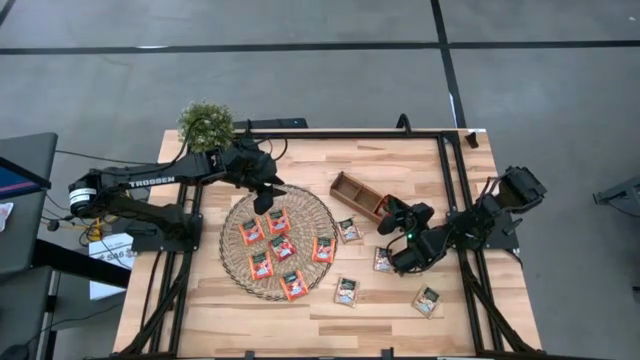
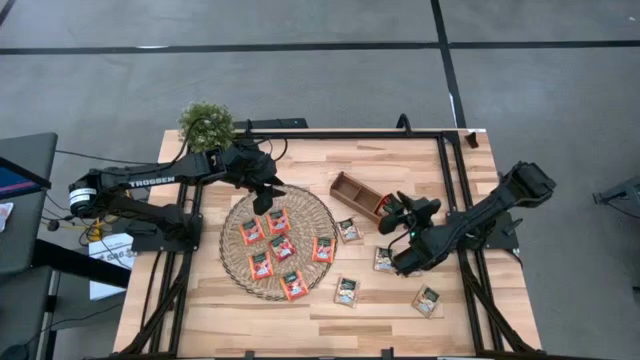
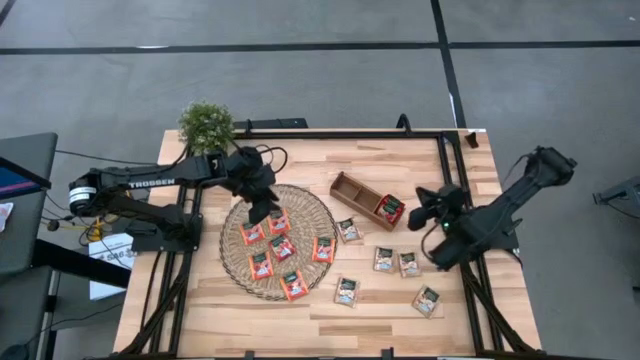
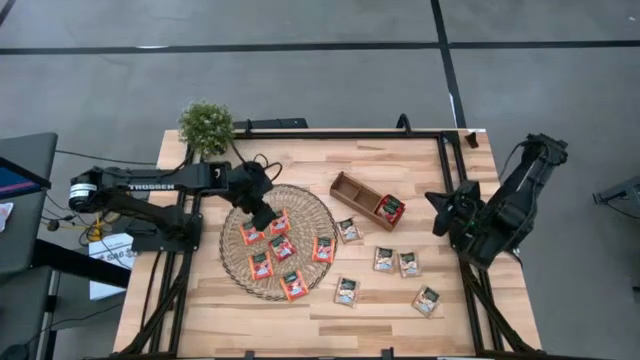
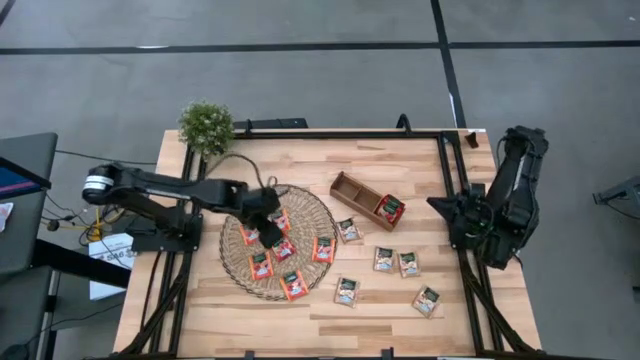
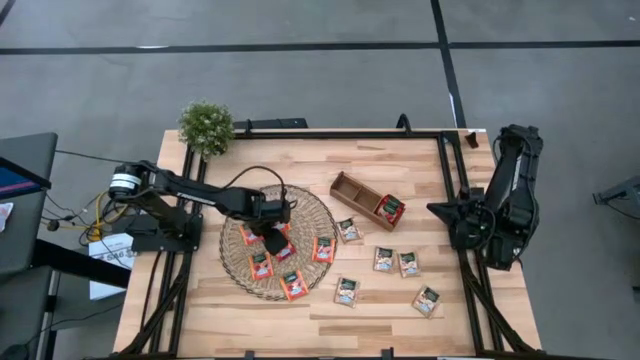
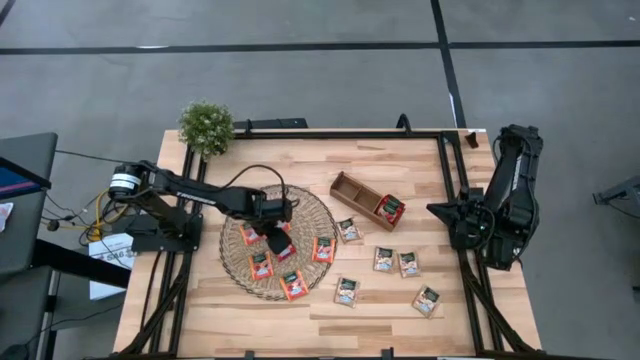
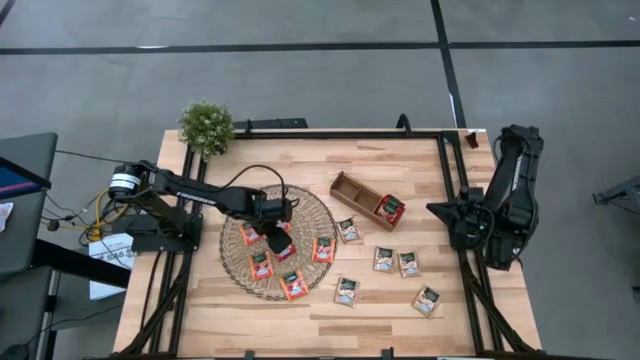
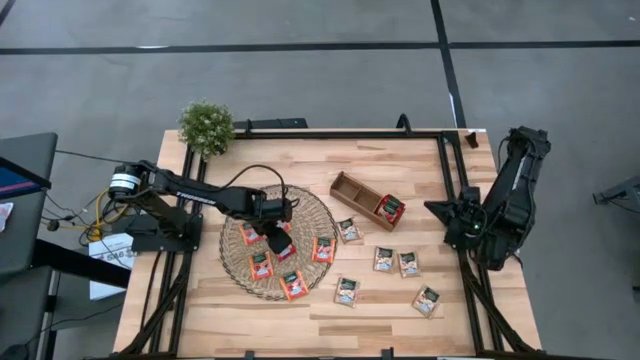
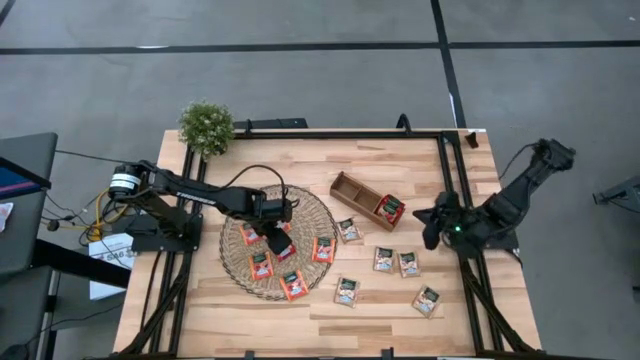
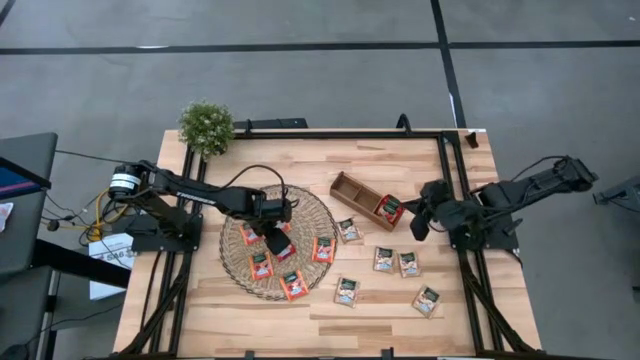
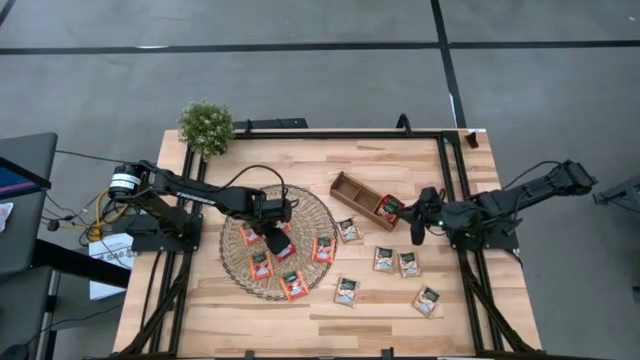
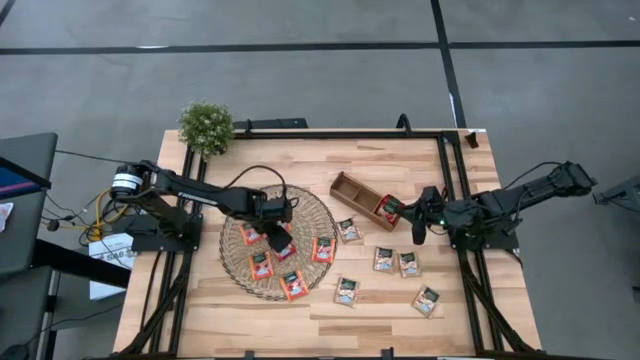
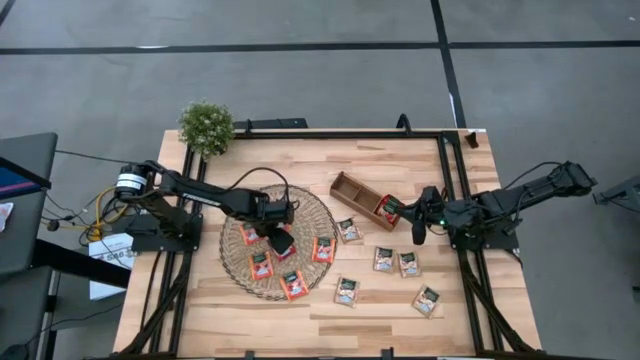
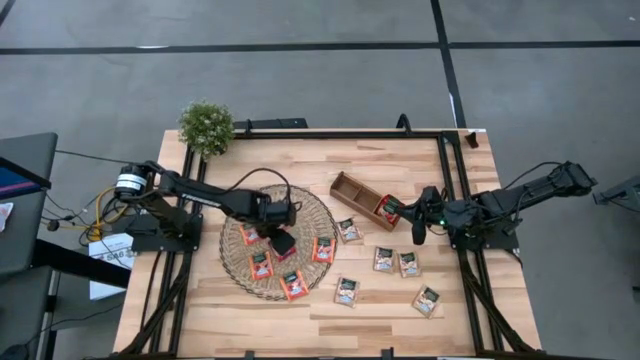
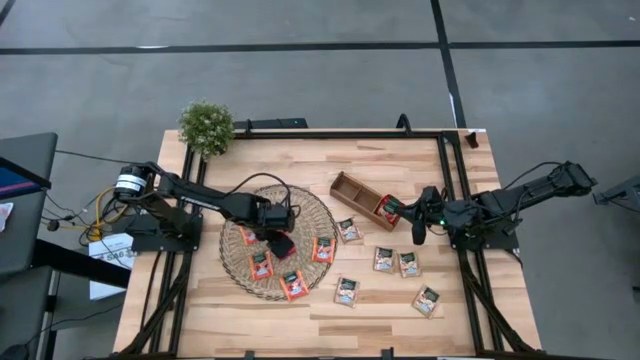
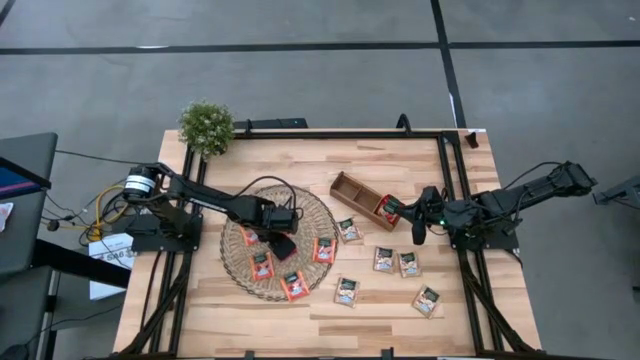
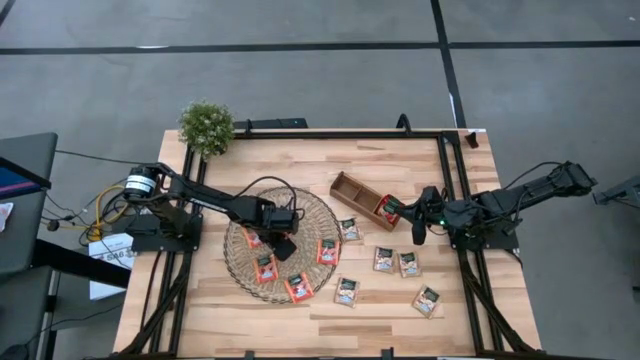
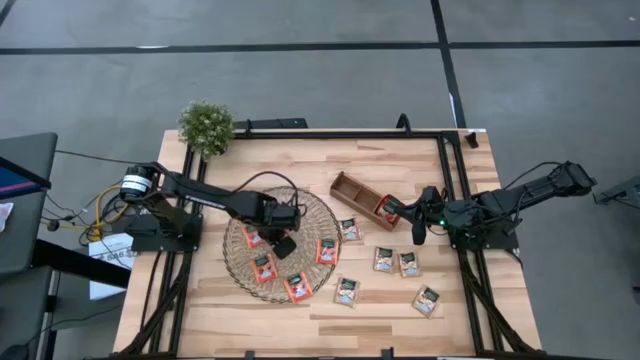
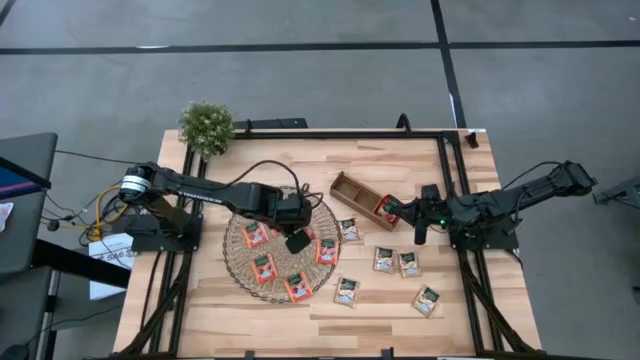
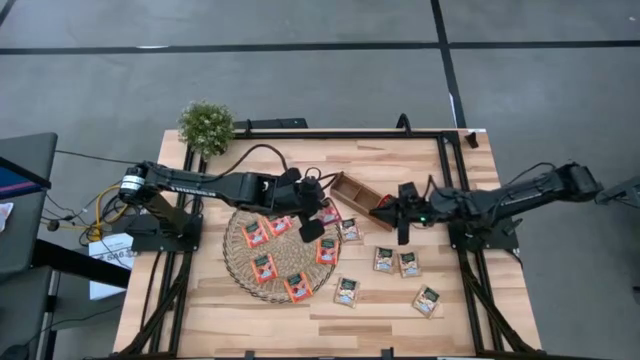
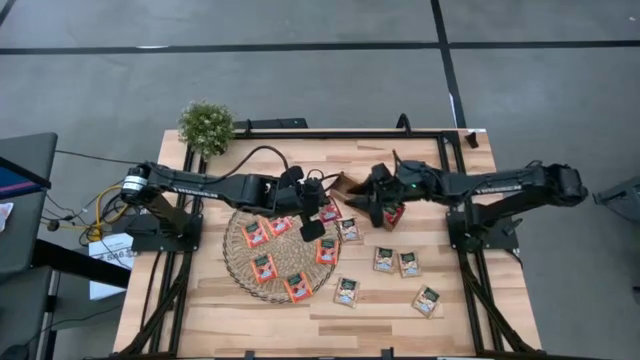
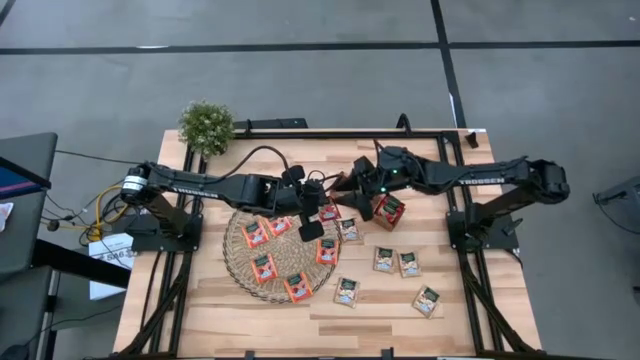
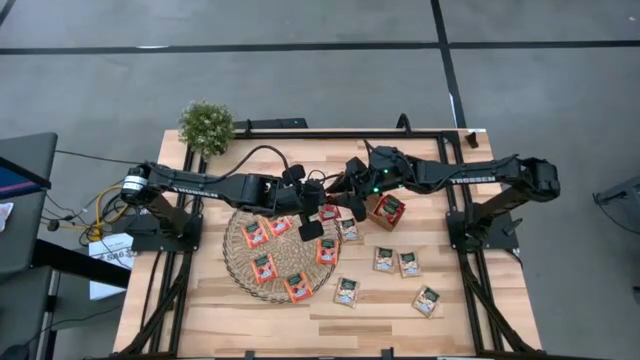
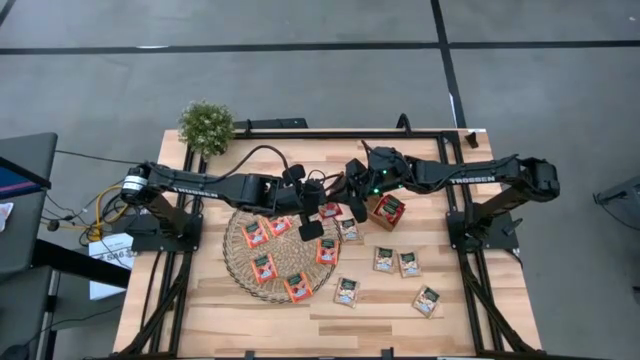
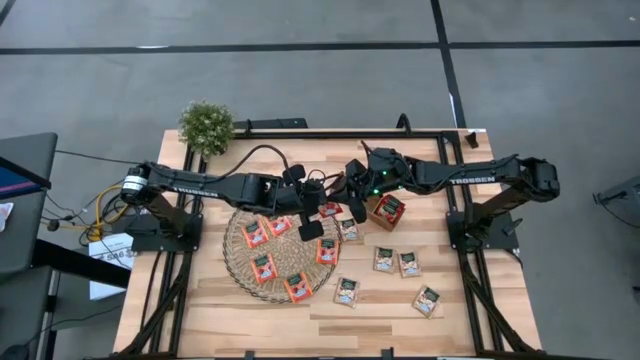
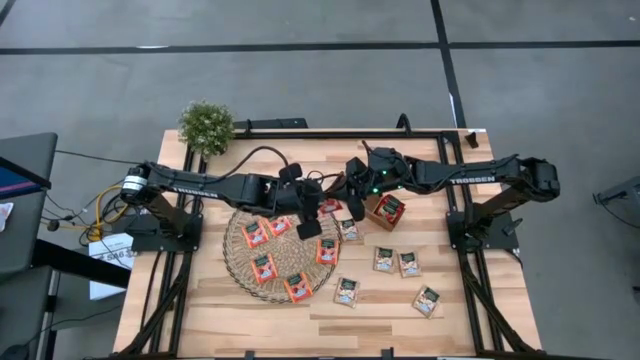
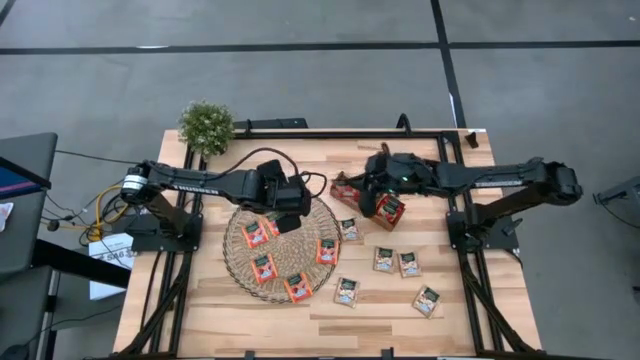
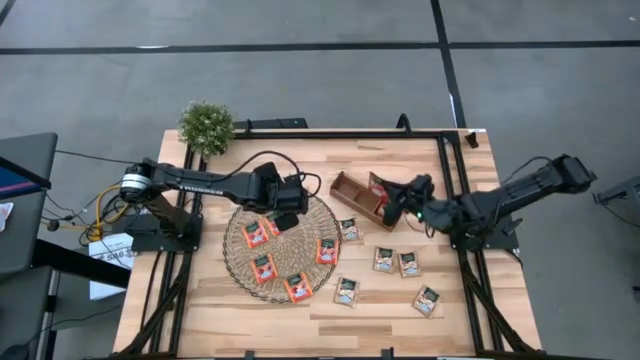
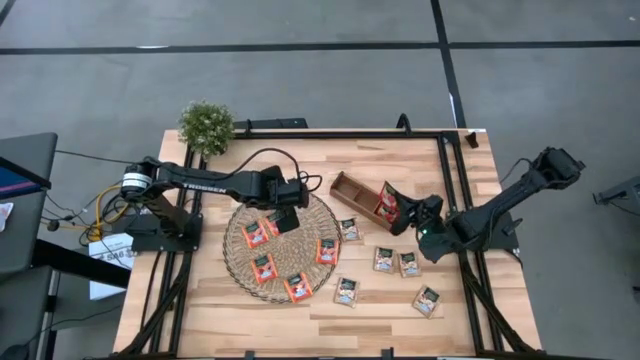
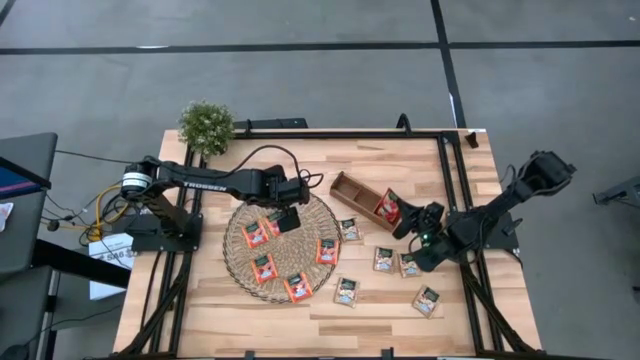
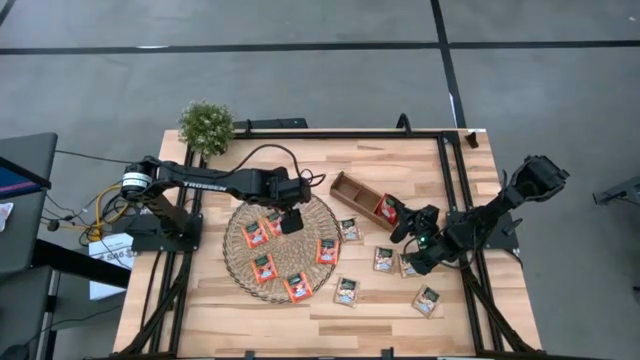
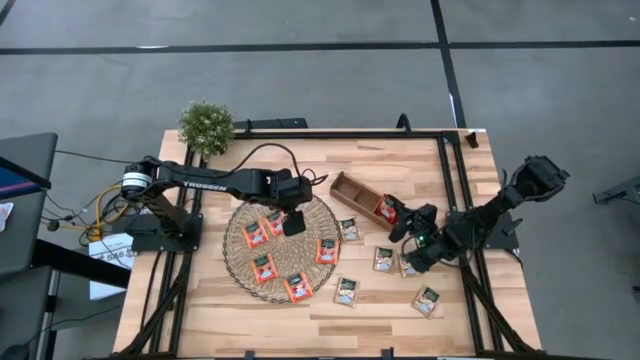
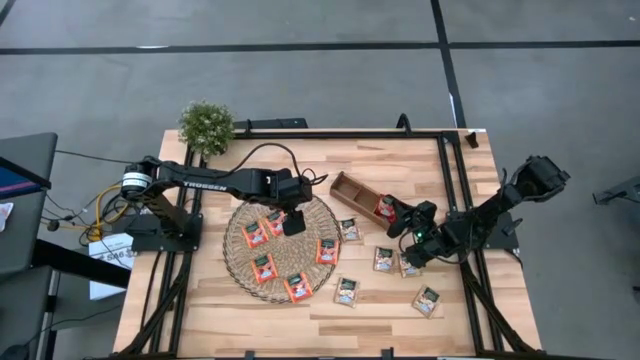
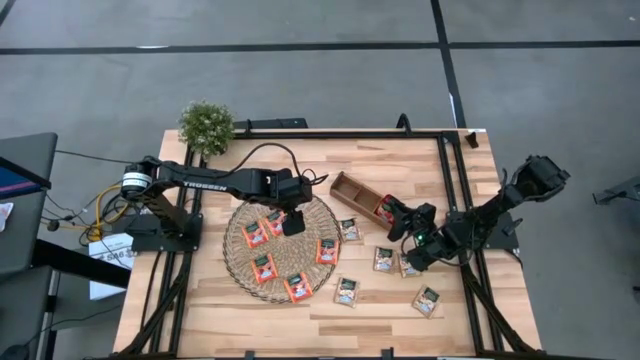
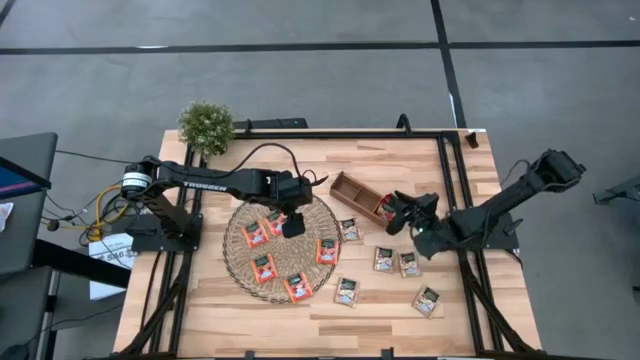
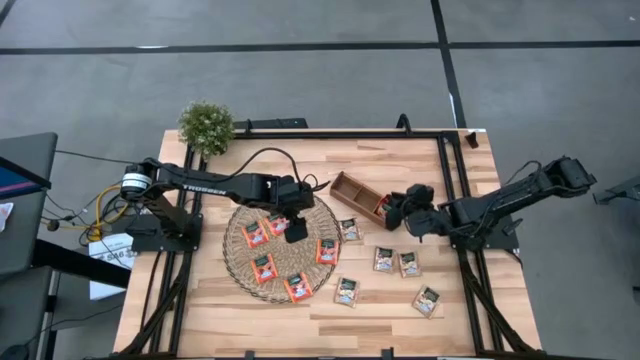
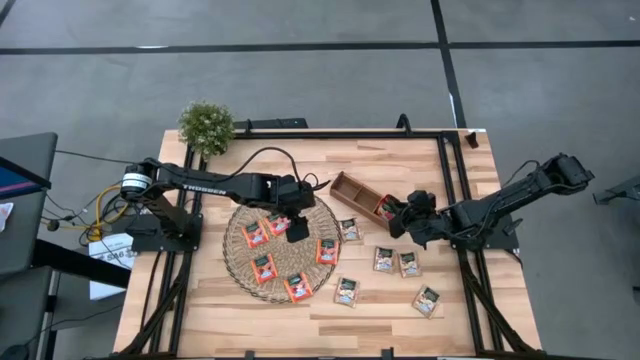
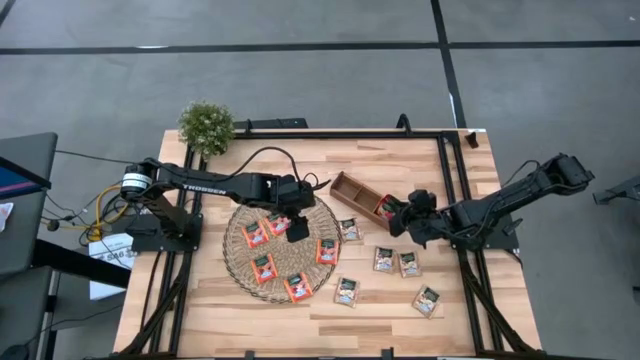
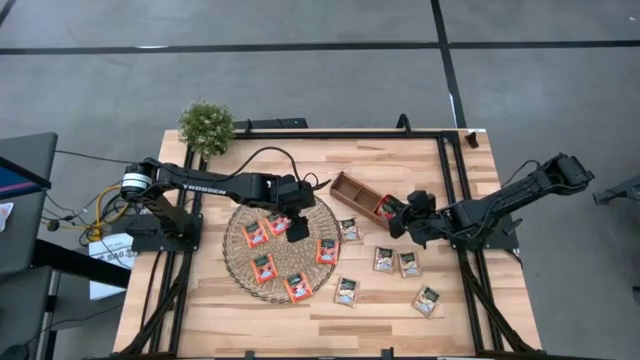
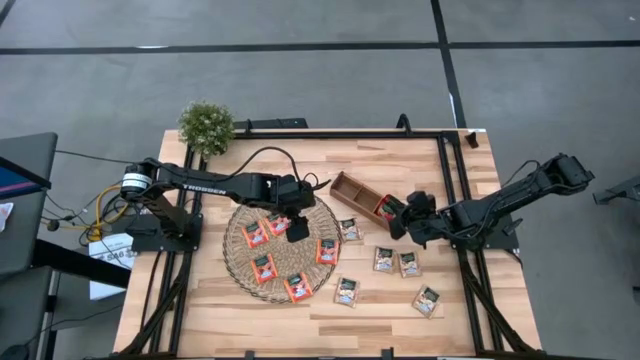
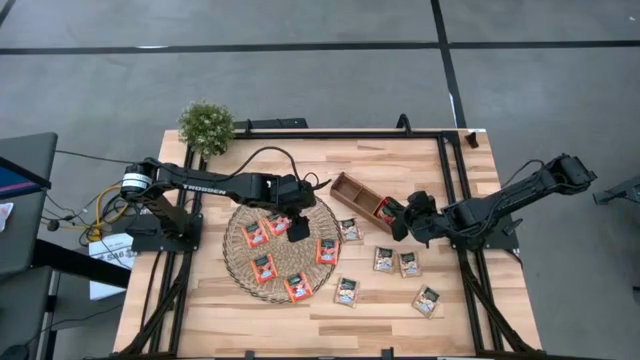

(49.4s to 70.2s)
Task: Pick & Place Tea
Put the red tea bag into the right section of the wooden organizer

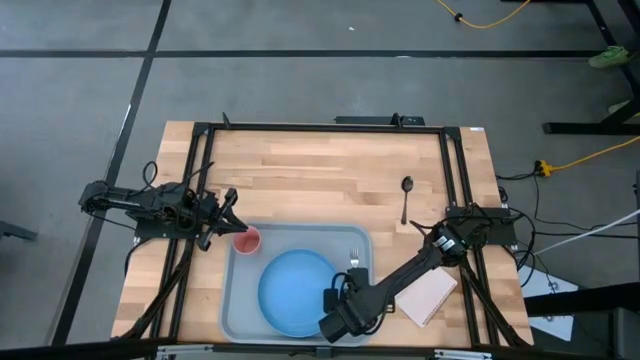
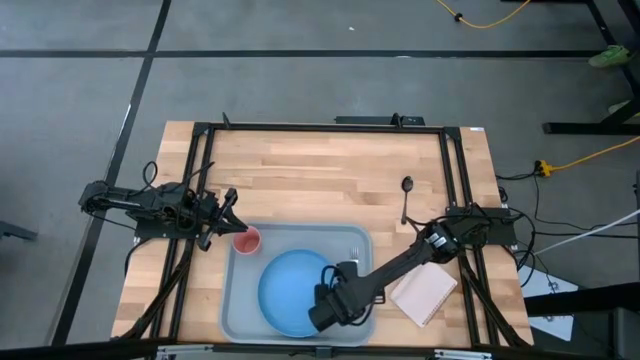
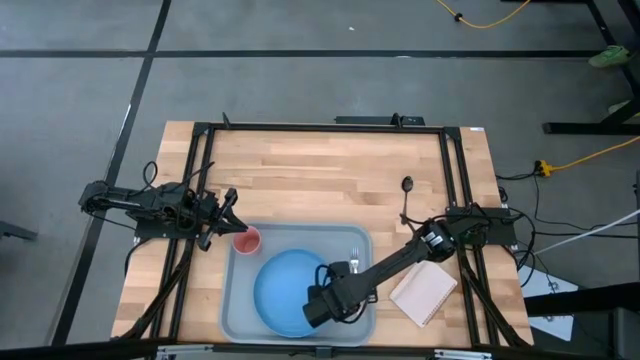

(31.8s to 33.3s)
Task: Pick and place plate/cup/fork/spoon on tray
Adjust the blue plate on the shelf
